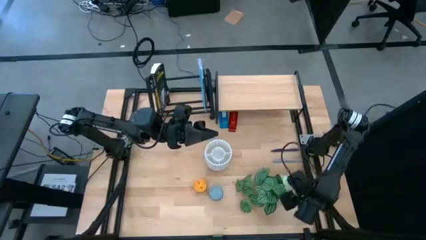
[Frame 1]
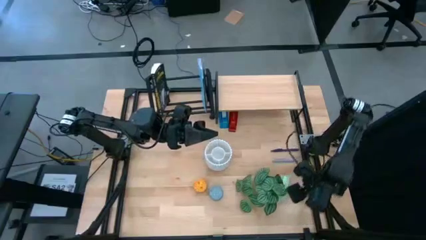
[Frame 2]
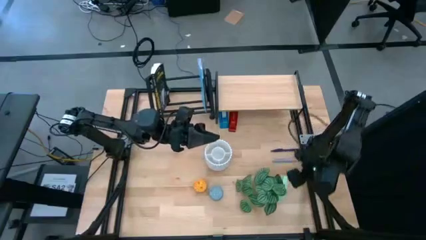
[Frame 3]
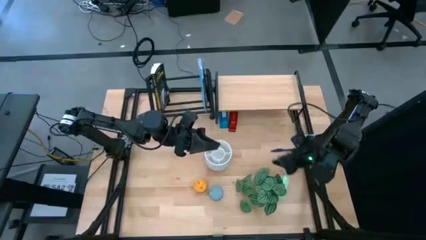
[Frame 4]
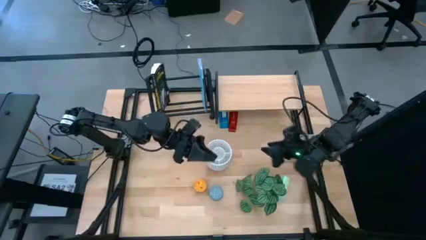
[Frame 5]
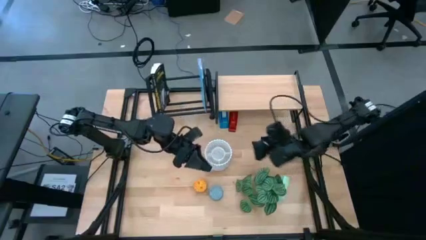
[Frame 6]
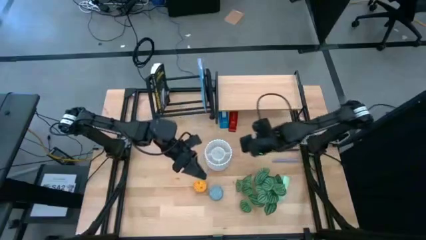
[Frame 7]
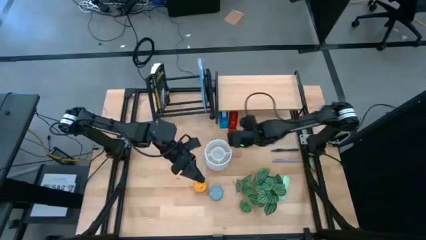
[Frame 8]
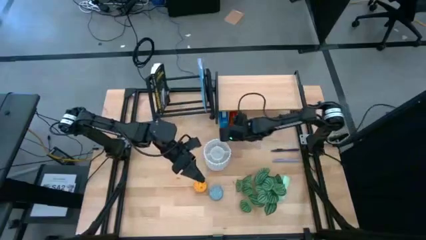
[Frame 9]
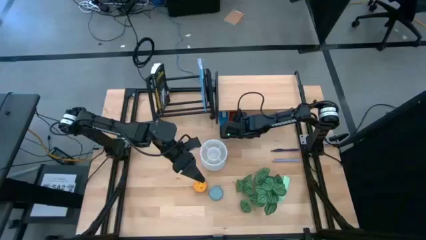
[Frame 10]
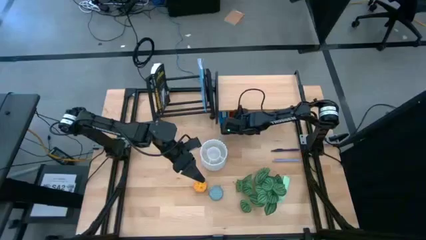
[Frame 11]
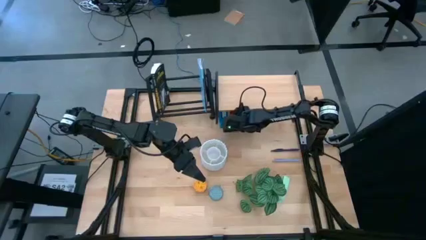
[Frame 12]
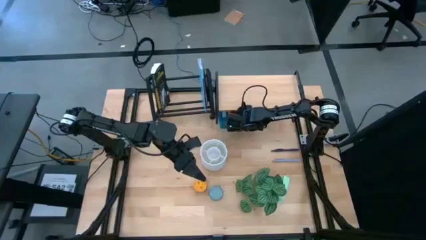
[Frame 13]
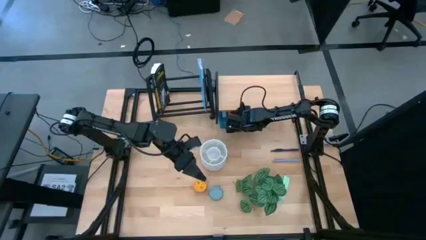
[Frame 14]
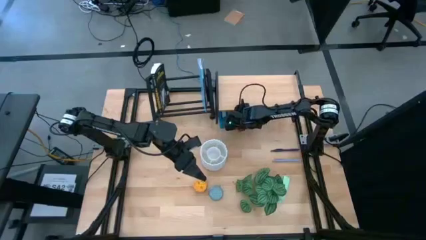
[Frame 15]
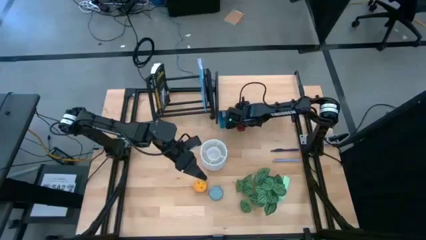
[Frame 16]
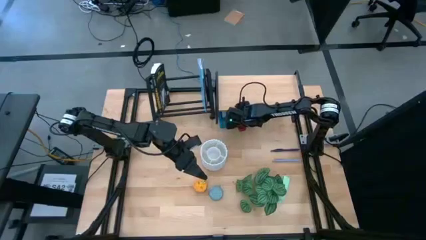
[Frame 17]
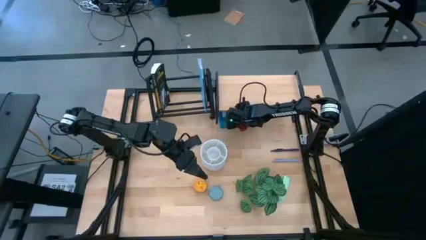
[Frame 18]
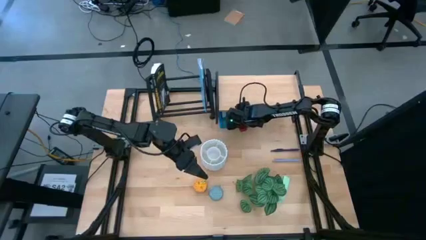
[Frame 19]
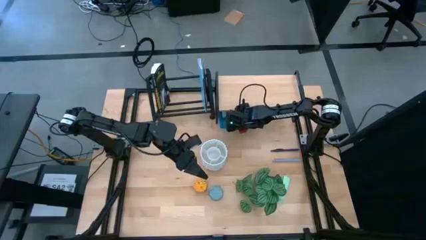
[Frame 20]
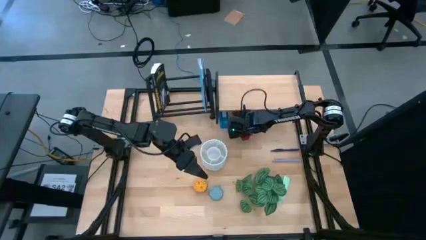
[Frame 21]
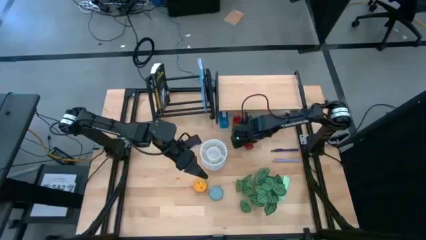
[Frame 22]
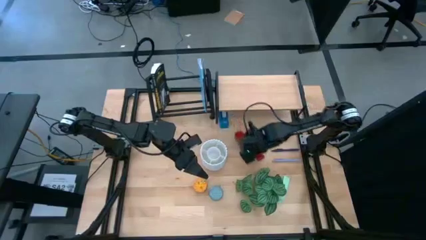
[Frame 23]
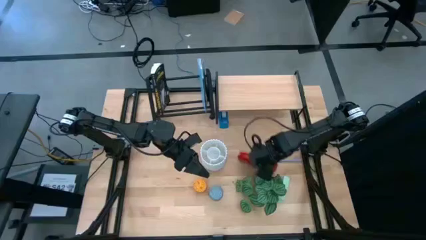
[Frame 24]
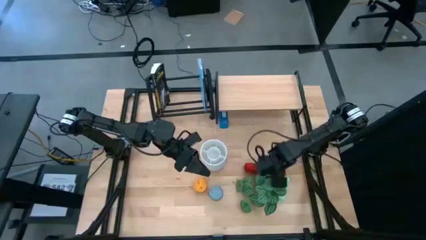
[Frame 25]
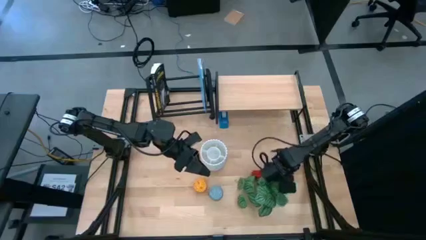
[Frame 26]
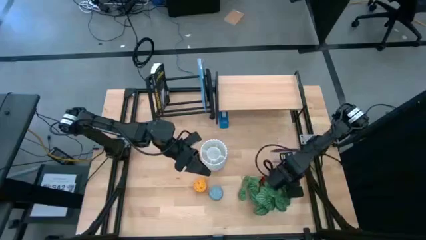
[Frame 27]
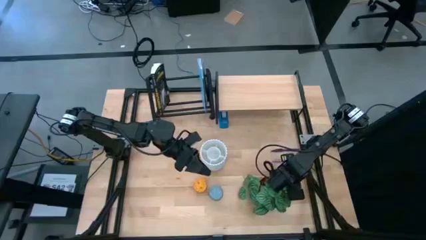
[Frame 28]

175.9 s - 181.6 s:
Task: Stock shelves
Remove the red stapler from under the shelf

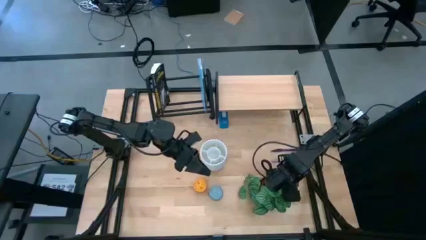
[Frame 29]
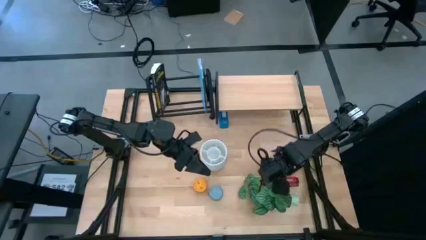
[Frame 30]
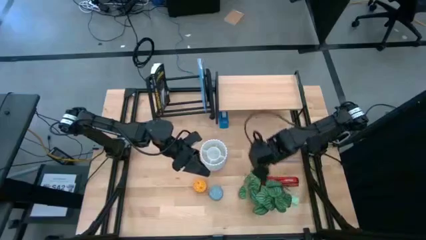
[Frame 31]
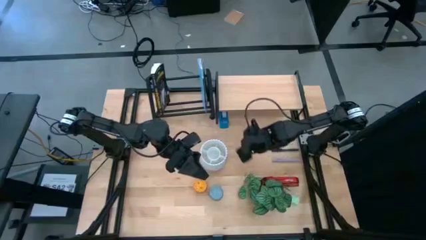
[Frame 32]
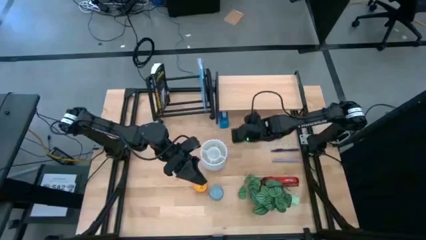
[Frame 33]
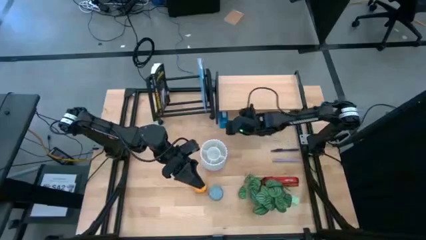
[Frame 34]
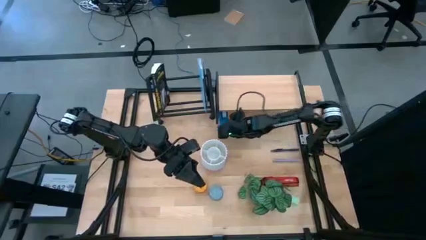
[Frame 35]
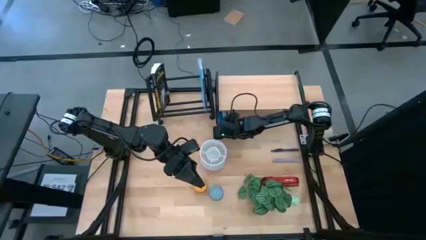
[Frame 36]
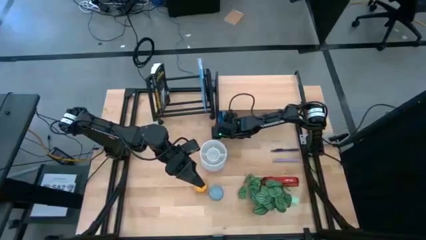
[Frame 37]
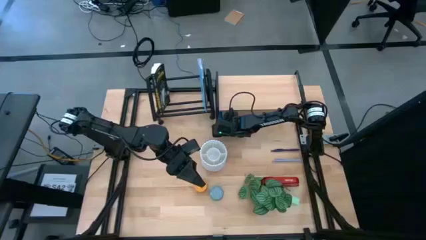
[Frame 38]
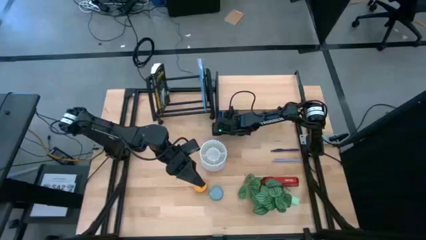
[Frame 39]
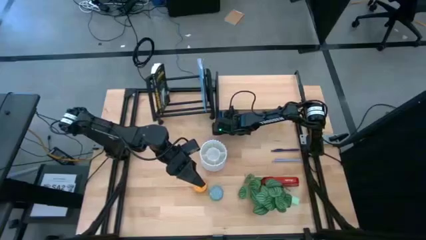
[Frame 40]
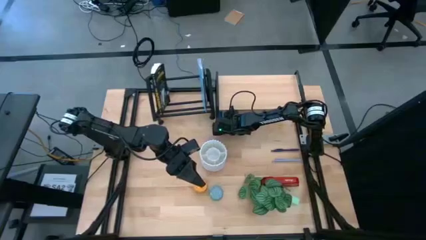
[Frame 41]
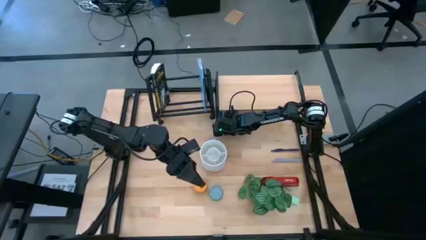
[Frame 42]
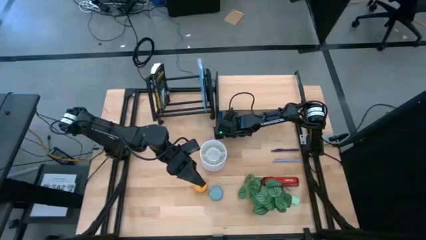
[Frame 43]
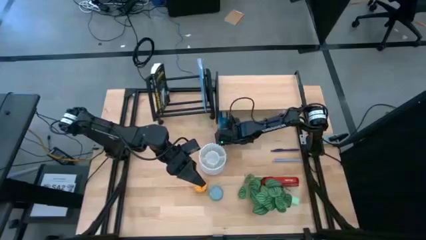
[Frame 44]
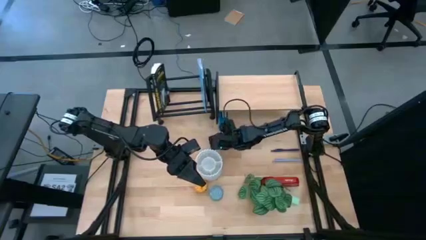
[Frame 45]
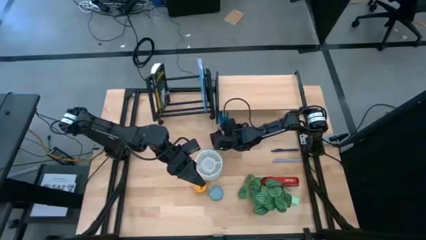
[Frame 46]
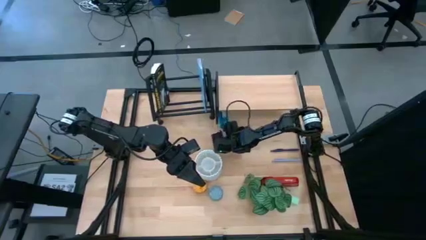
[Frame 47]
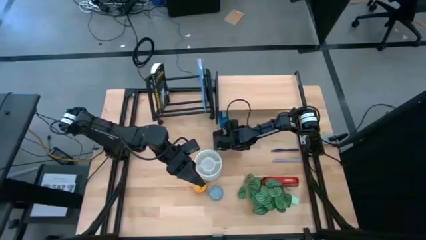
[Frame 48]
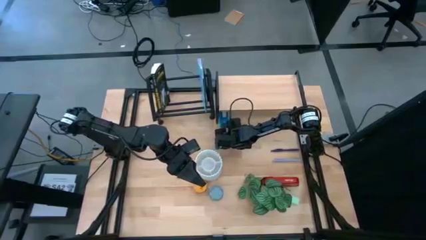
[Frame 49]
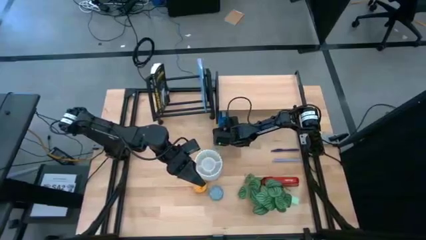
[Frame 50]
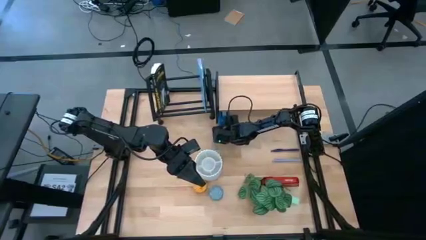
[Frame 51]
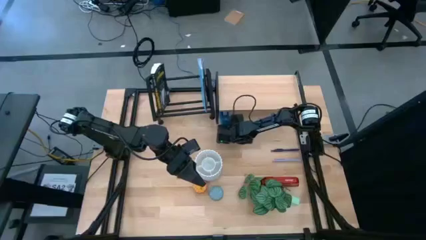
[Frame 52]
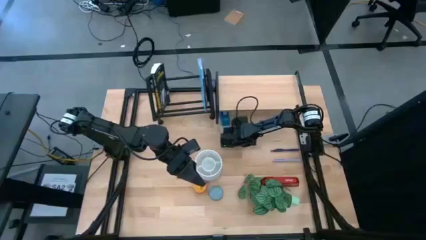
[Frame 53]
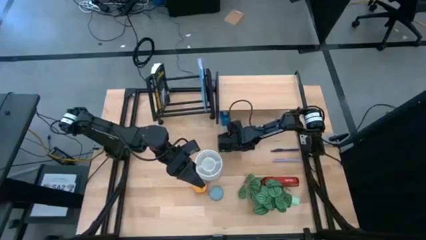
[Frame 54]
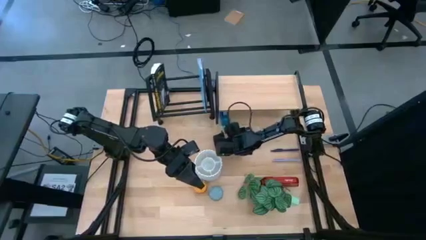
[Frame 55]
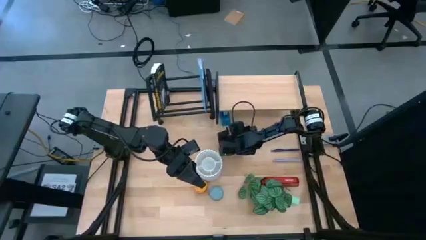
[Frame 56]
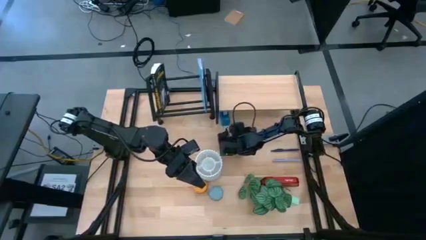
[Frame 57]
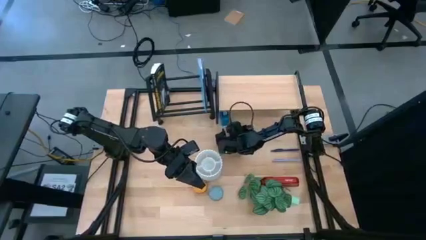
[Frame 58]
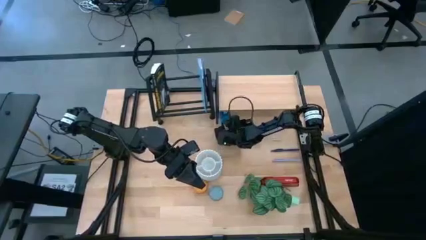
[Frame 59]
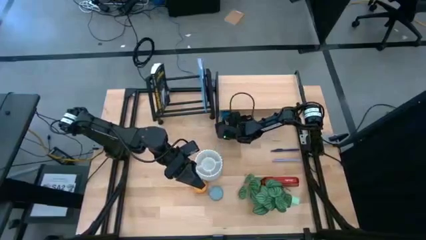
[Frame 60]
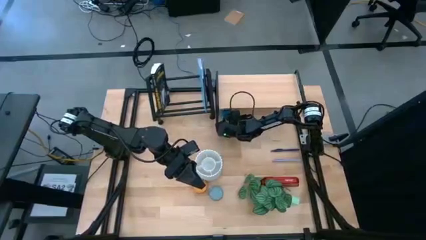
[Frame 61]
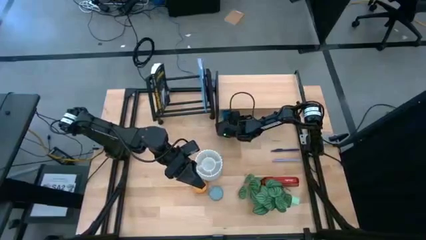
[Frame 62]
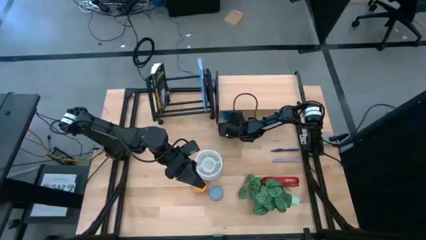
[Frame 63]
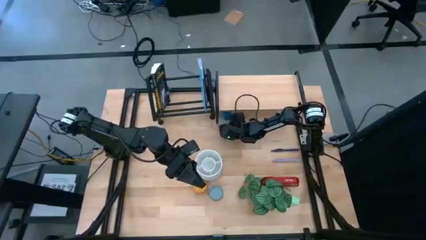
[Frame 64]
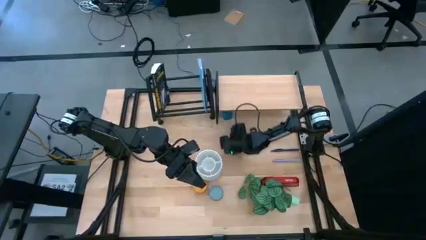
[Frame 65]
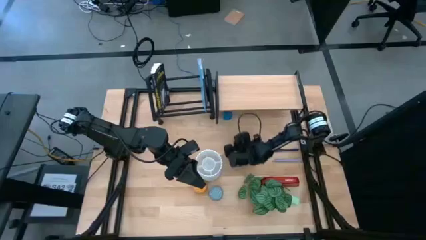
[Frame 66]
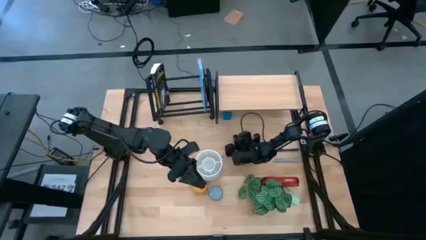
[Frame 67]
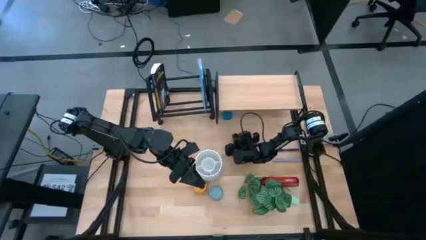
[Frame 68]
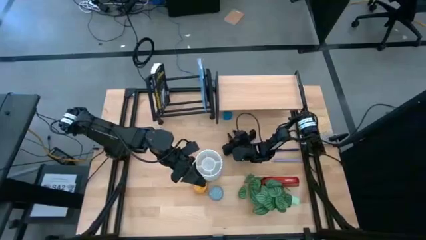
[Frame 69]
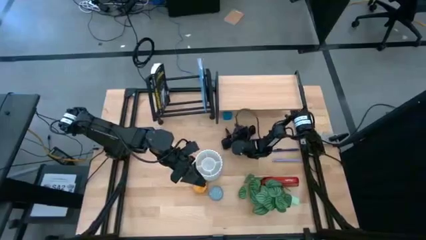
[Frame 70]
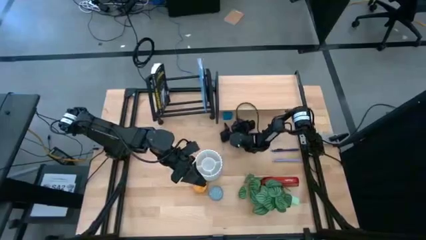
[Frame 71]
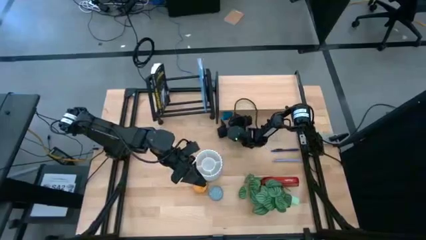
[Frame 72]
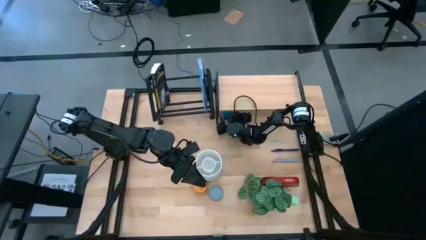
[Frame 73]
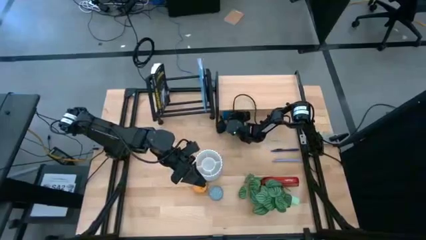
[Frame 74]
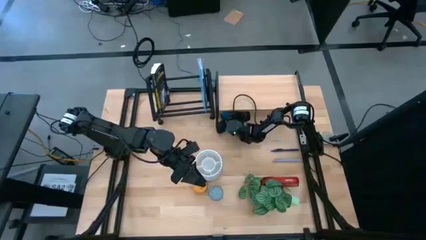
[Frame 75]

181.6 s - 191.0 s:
Remove the blue tape dispenser from under the shelf

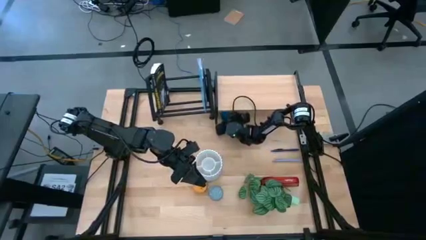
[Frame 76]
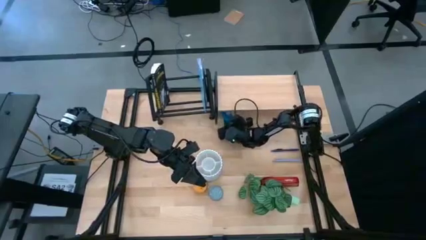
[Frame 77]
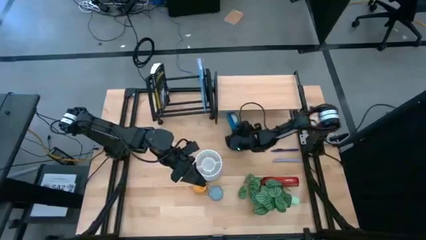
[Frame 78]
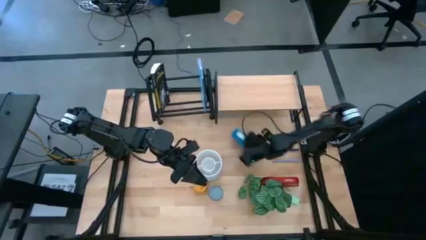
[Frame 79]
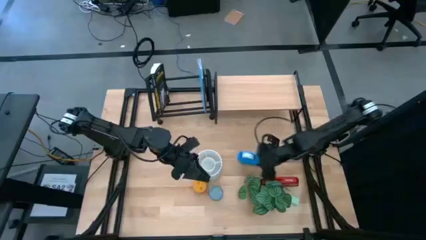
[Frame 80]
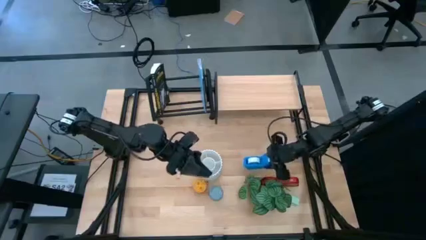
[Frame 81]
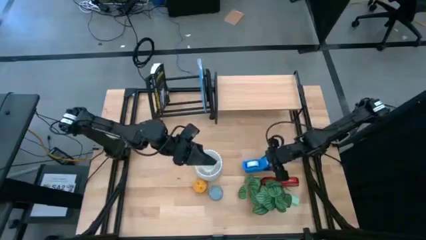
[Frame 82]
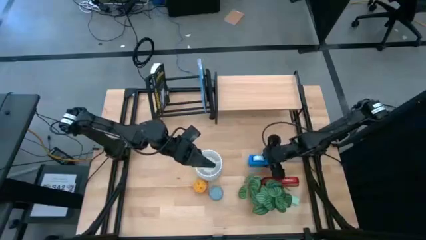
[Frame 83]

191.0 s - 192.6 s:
Remove the blue tape dispenser from under the shelf
